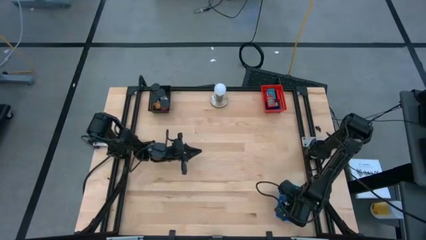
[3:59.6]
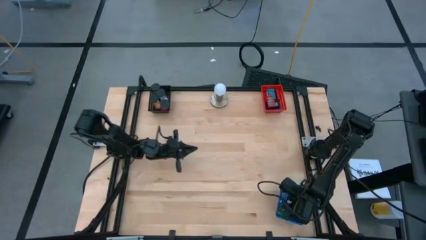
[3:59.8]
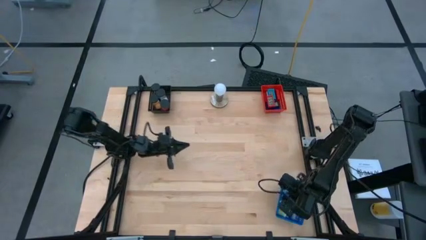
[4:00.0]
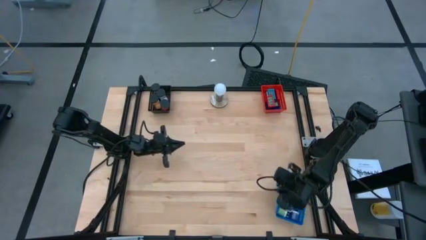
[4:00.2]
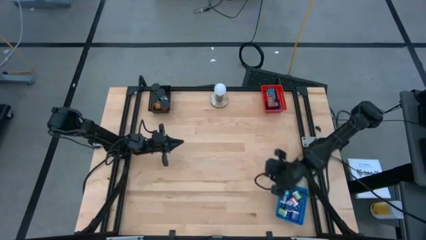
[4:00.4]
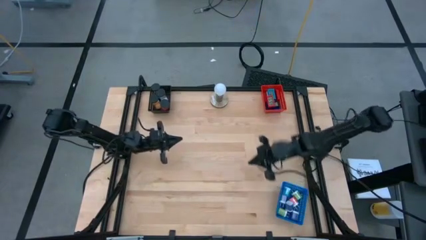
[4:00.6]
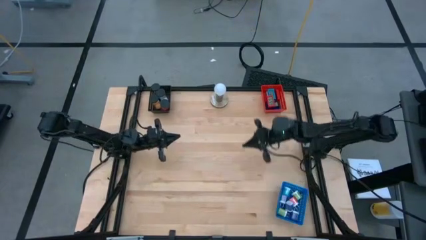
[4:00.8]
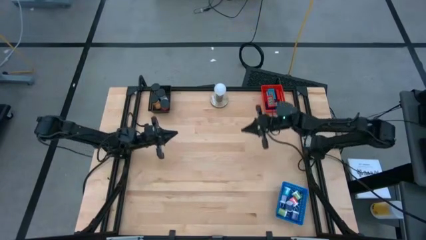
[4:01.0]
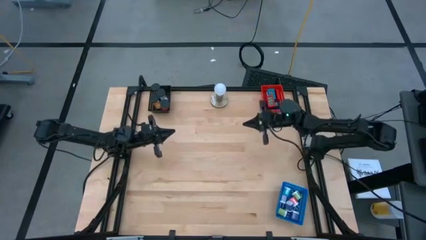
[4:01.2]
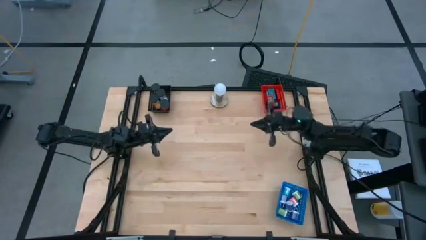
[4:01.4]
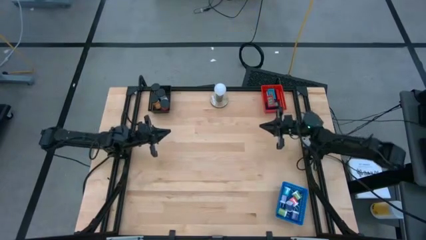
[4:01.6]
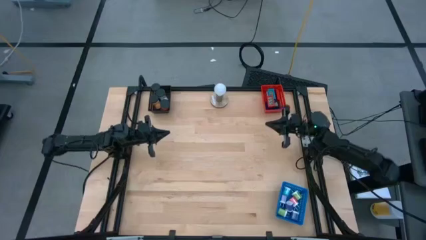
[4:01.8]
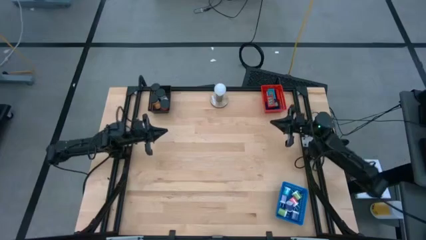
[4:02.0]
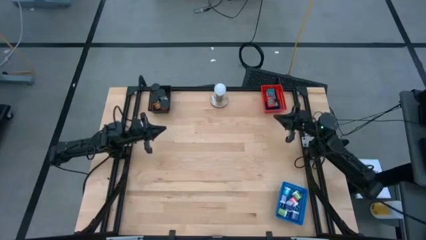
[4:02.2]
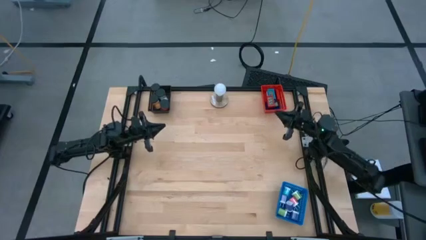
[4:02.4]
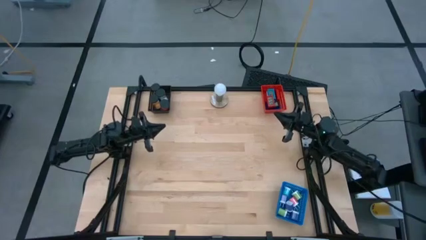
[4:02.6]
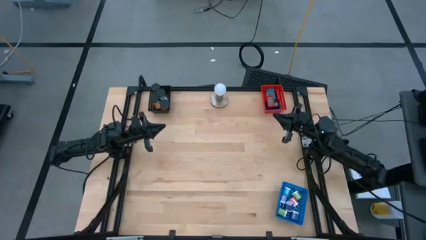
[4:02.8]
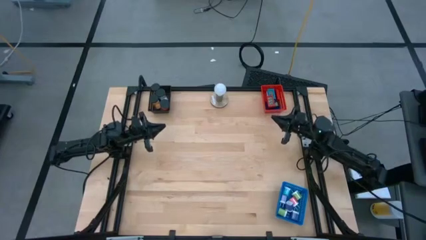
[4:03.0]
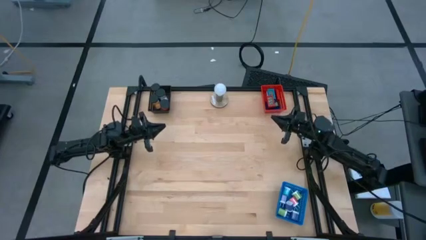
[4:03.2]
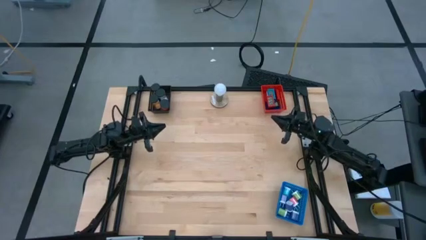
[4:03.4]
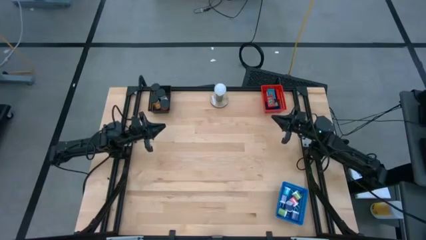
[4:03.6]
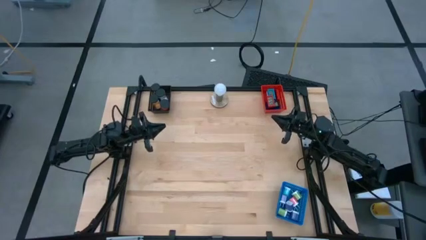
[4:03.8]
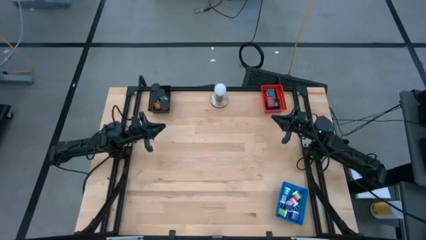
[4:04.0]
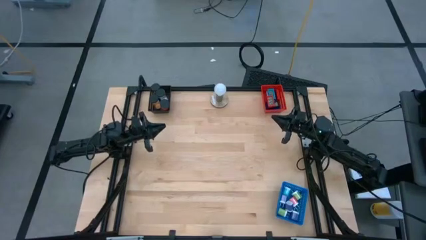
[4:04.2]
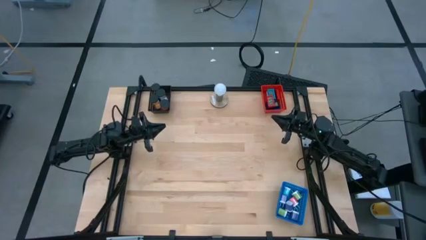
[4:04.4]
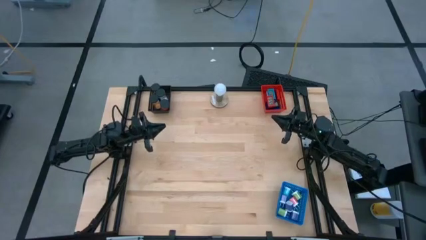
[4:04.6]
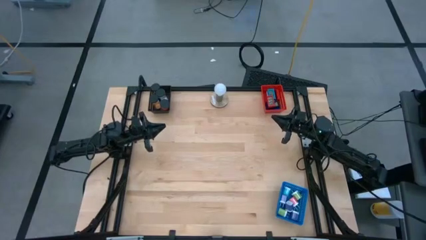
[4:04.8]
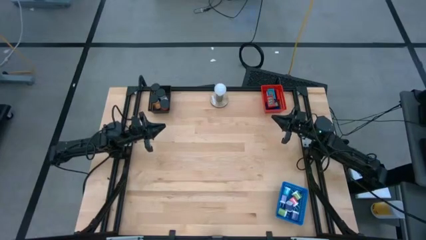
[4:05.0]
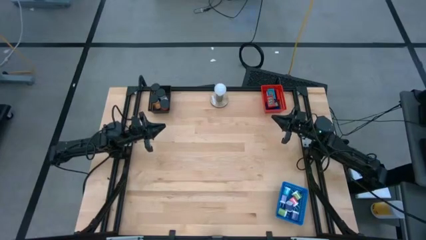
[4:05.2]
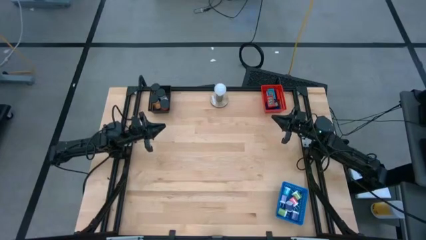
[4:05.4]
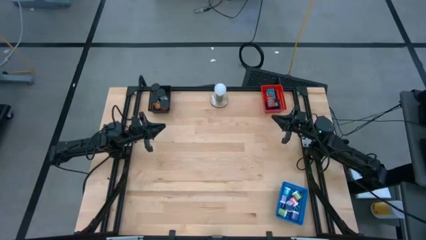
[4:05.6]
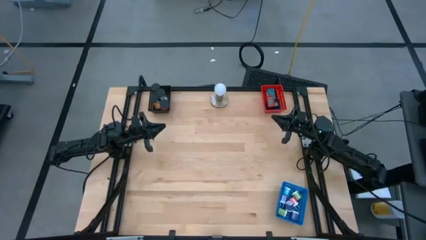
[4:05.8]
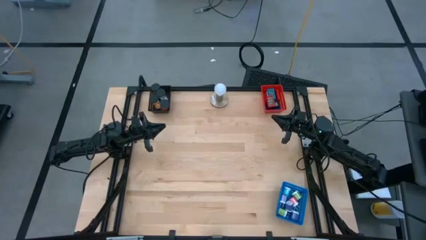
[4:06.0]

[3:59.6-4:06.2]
Task: Pick & Place Office items
Return to Home Position

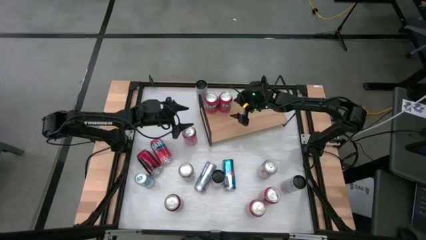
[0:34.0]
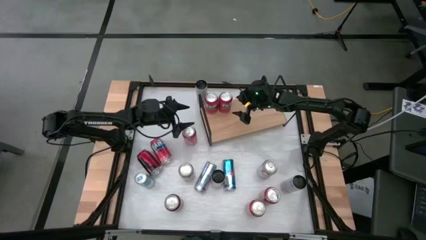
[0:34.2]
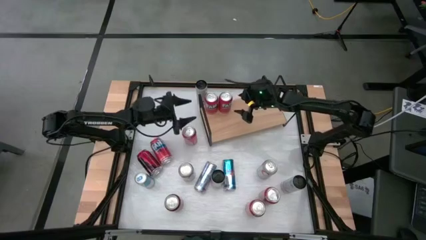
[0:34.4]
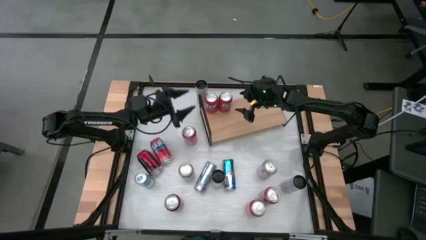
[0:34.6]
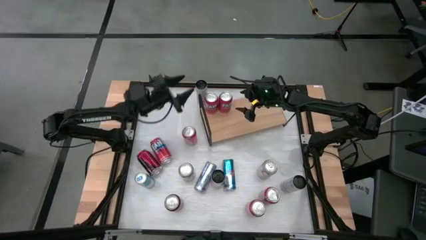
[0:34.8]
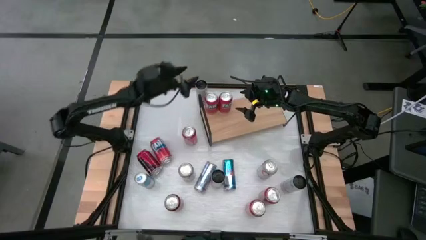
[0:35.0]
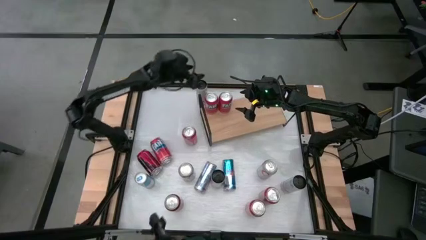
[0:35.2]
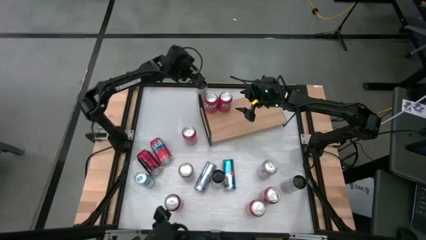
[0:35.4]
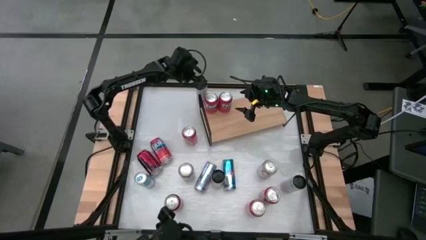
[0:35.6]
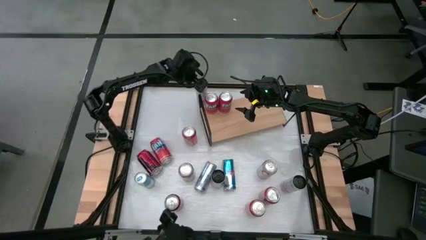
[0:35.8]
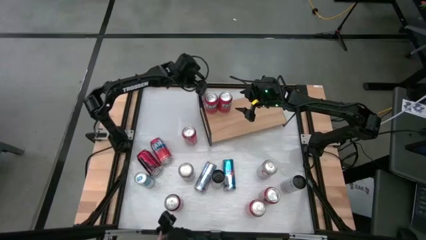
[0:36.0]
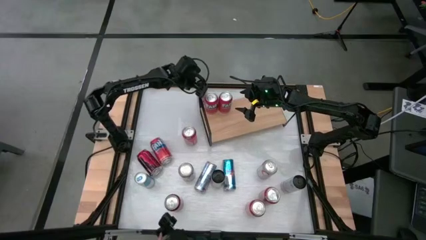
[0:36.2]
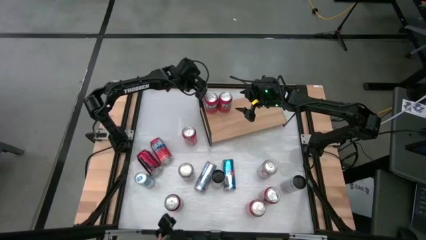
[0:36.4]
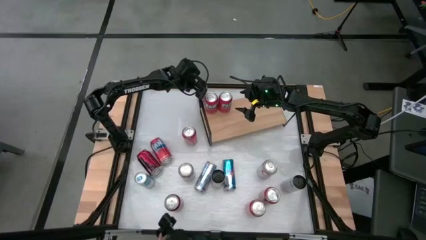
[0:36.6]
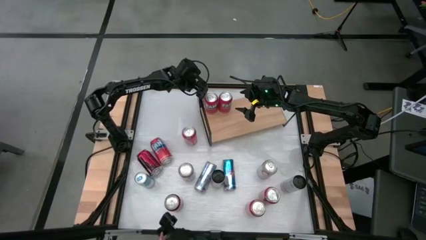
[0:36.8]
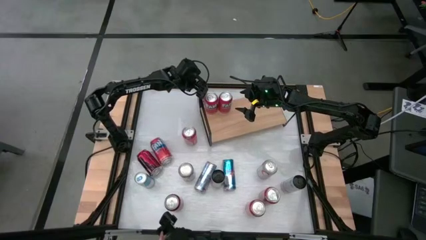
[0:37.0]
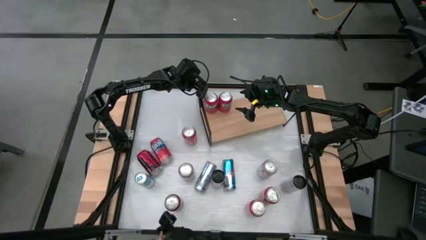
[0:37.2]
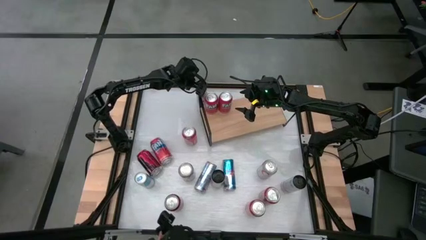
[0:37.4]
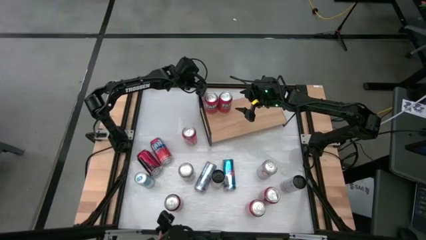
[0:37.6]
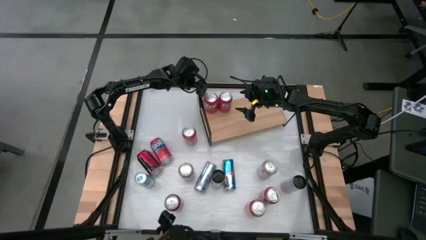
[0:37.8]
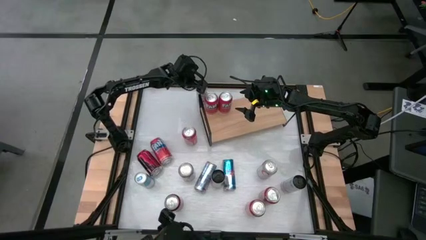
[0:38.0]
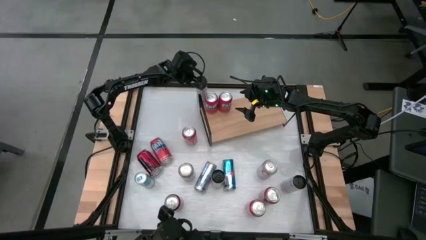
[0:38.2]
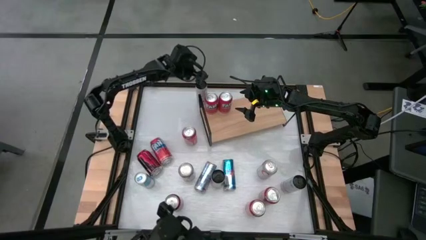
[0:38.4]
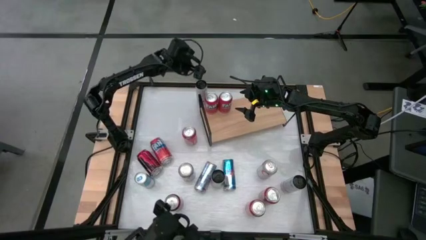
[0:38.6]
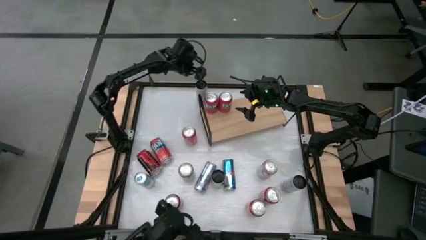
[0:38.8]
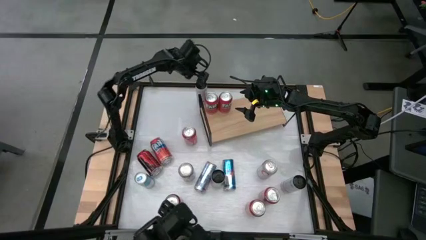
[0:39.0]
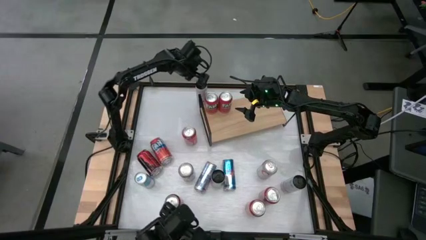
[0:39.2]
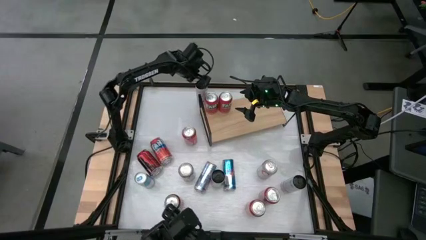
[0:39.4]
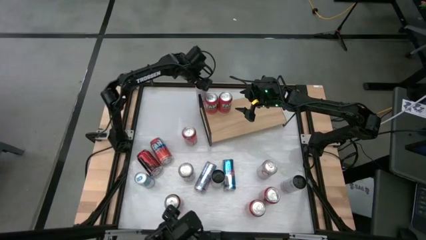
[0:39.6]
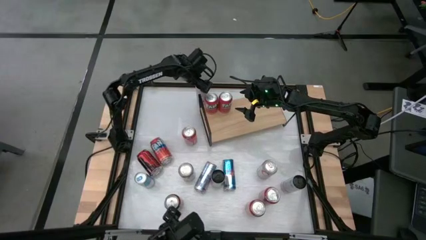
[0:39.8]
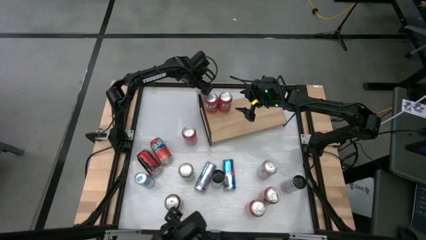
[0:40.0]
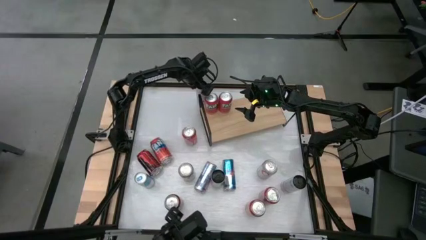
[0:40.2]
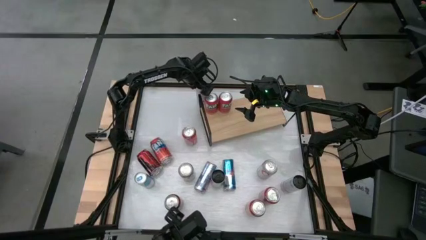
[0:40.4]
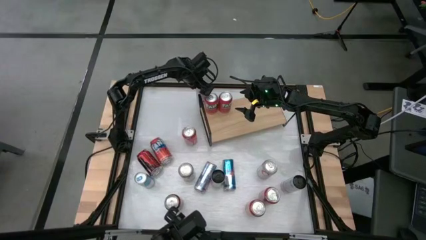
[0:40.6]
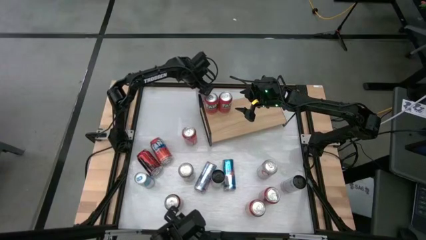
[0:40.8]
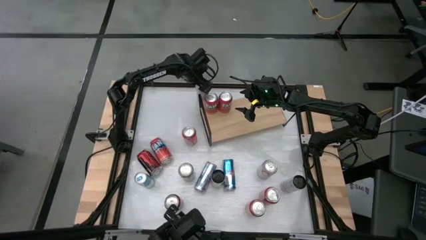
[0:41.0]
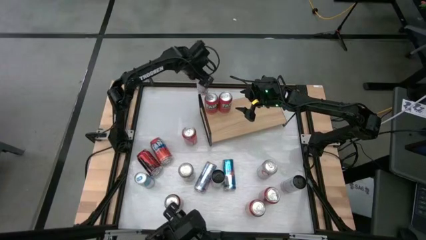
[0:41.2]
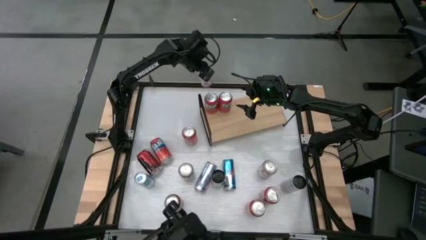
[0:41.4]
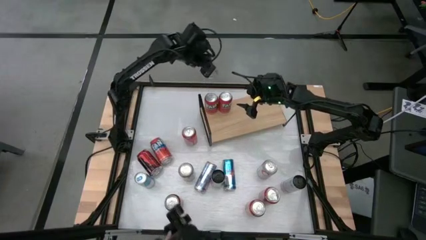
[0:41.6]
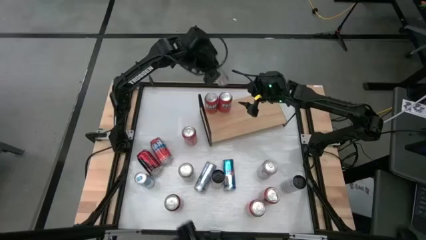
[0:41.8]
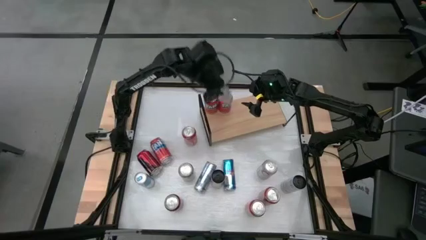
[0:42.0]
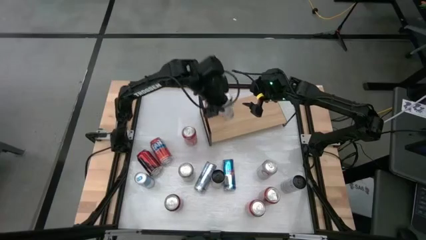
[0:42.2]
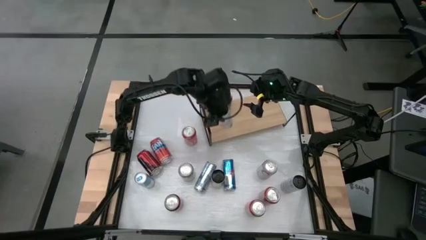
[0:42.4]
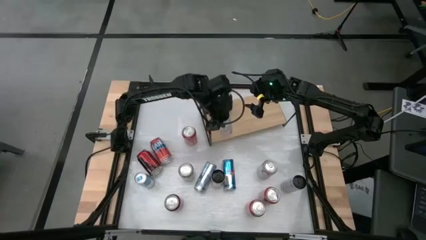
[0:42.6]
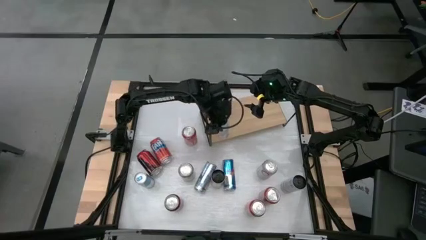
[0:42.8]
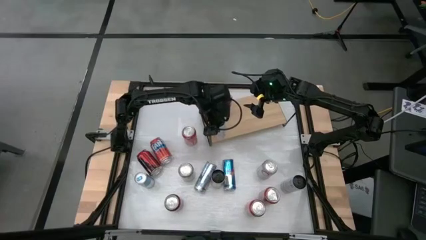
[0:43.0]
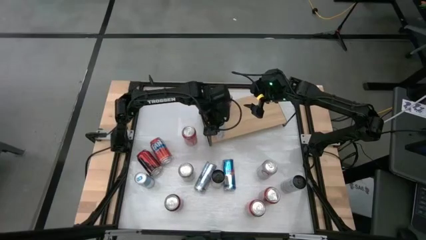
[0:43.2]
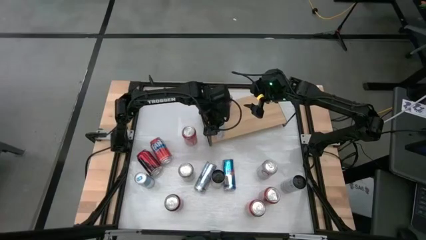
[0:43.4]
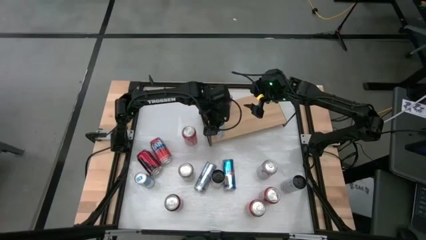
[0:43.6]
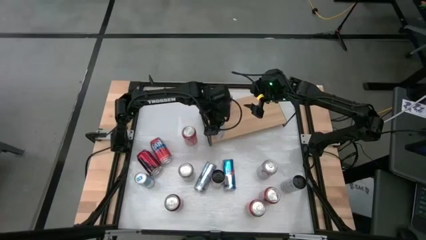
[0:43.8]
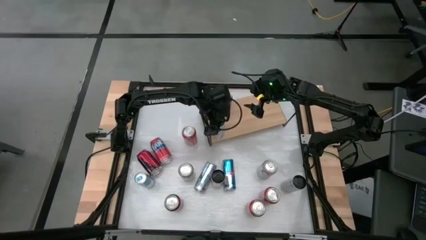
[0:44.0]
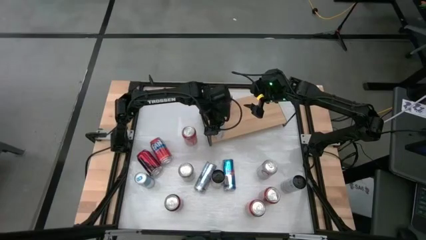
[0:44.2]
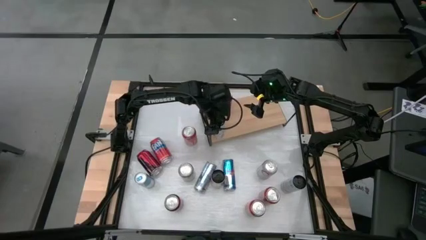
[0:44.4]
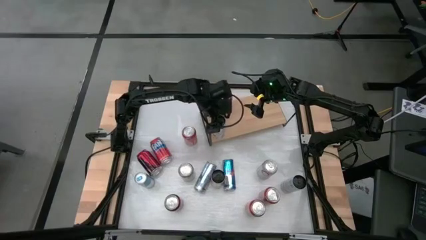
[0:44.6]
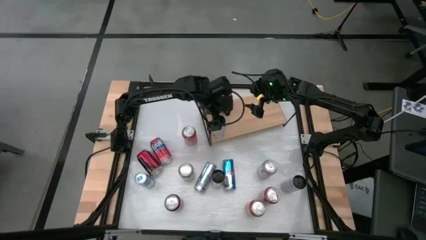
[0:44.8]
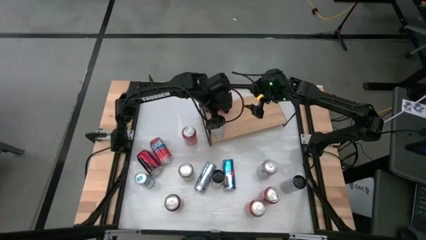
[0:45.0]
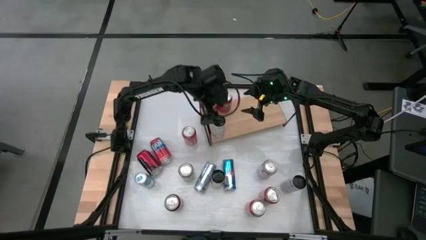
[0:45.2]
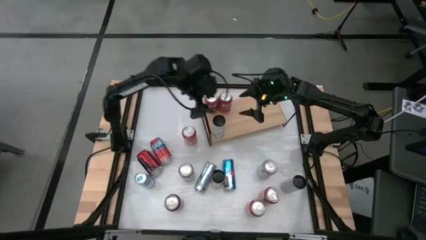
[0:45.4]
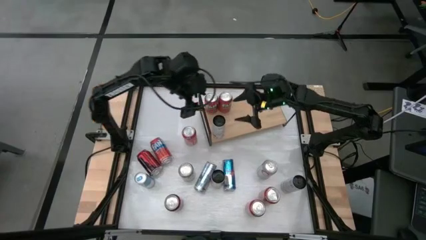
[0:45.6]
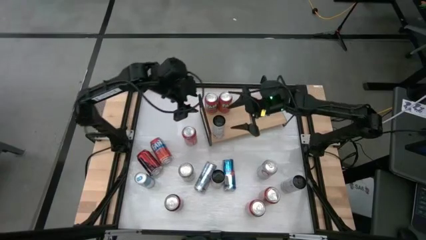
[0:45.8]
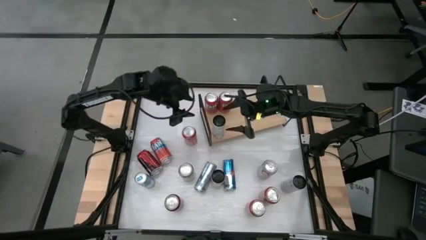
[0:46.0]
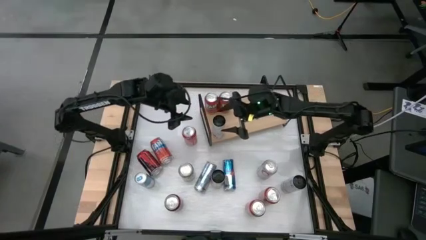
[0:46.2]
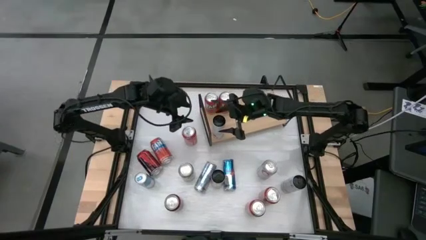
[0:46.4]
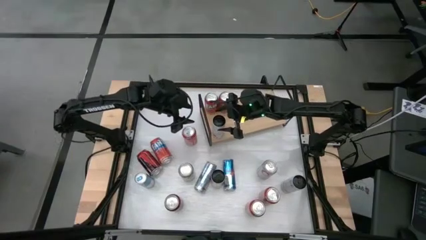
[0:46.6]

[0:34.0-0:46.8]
Task: Place canned beverage on shelf
Put the top black soda can on the shelf
